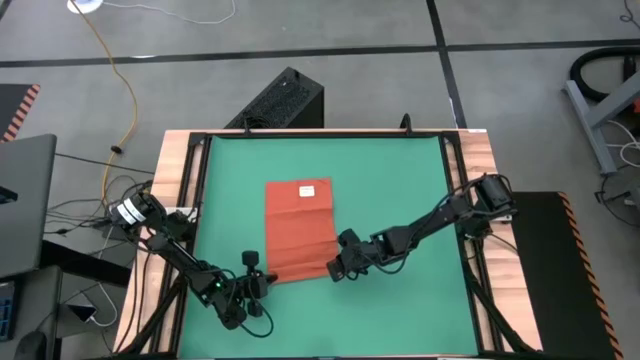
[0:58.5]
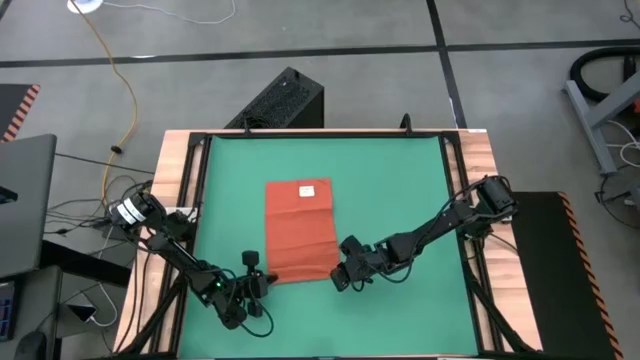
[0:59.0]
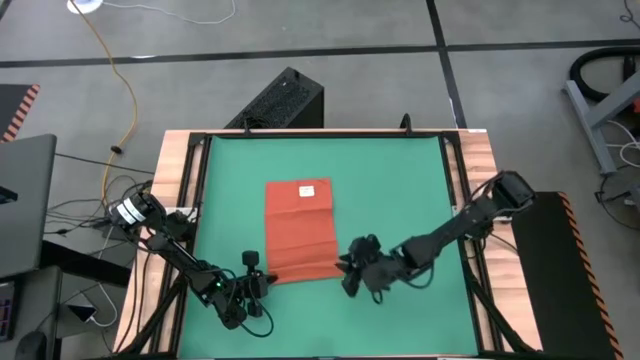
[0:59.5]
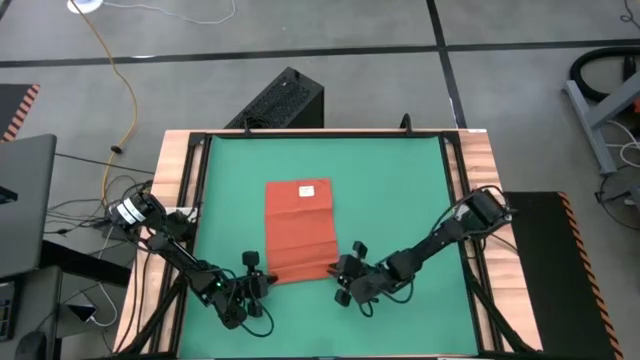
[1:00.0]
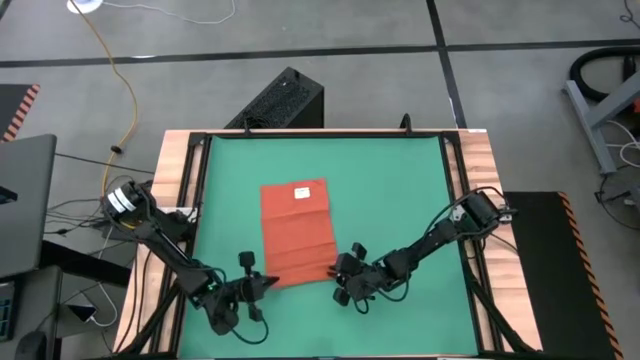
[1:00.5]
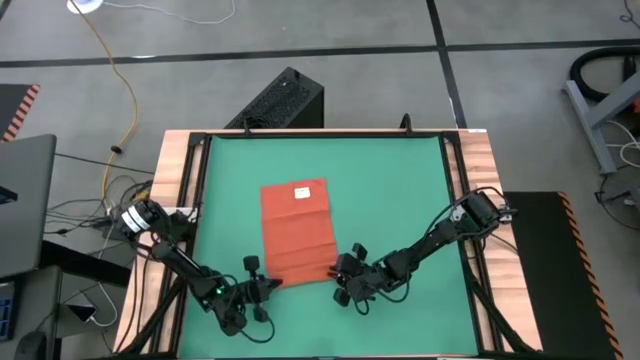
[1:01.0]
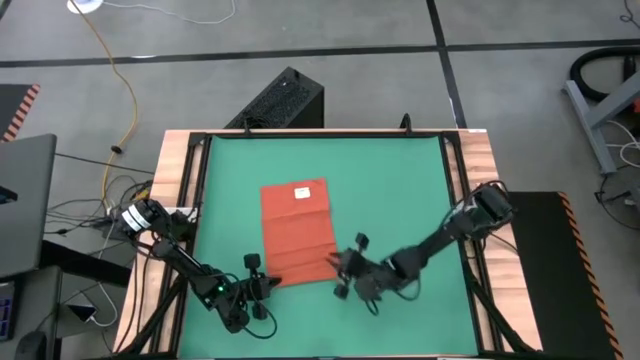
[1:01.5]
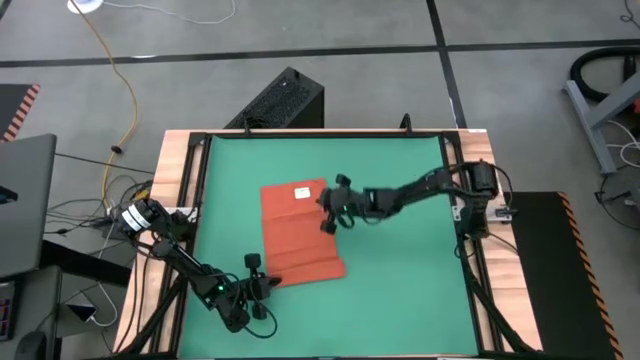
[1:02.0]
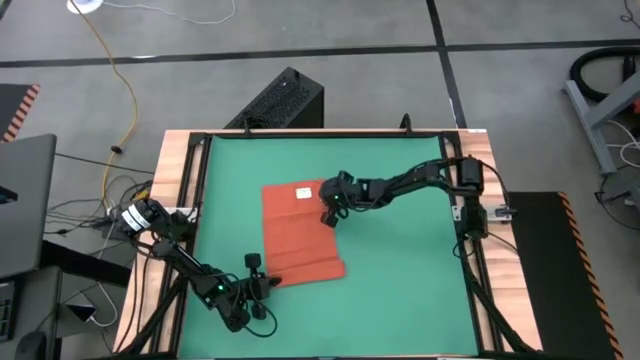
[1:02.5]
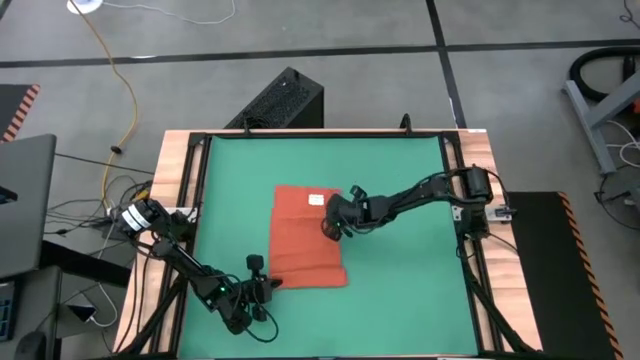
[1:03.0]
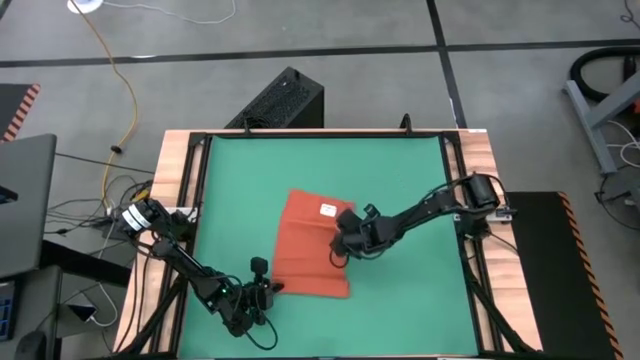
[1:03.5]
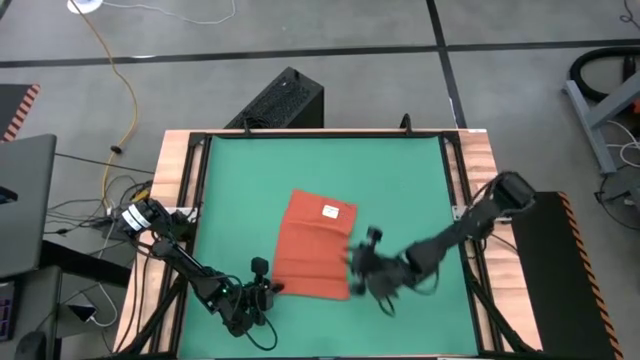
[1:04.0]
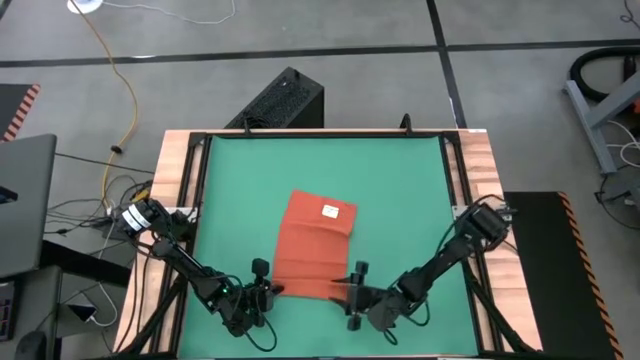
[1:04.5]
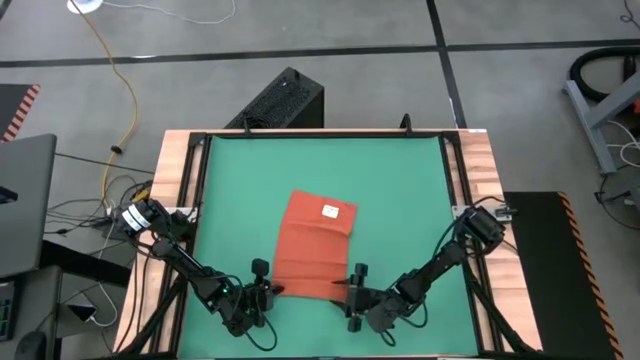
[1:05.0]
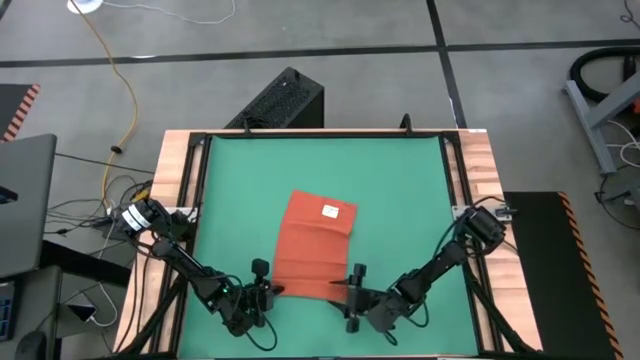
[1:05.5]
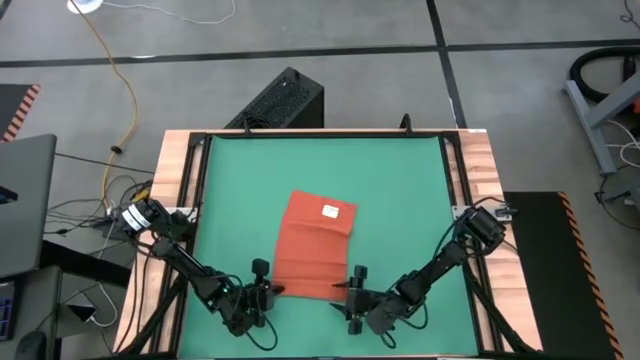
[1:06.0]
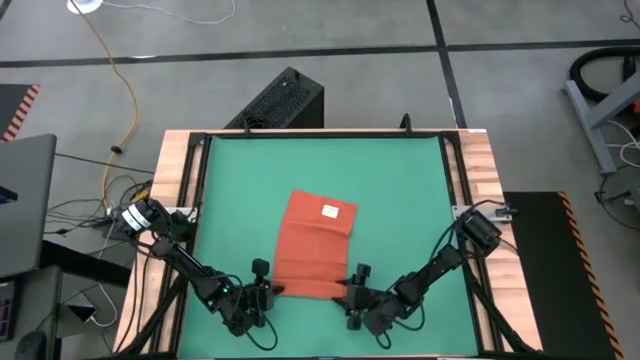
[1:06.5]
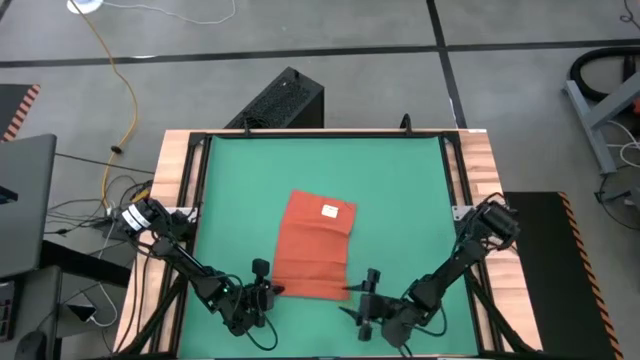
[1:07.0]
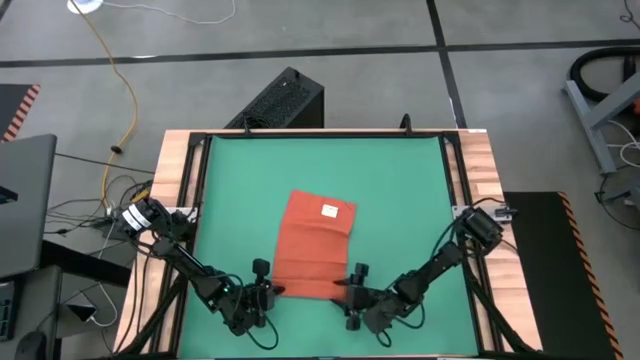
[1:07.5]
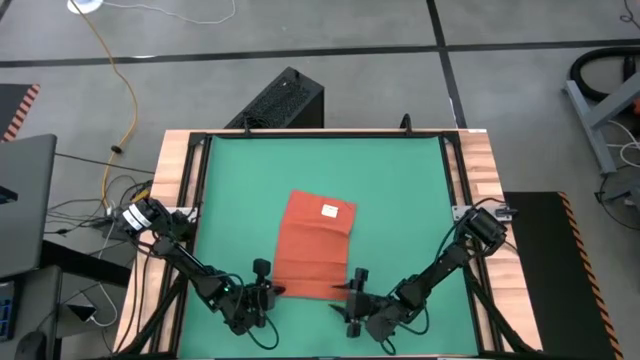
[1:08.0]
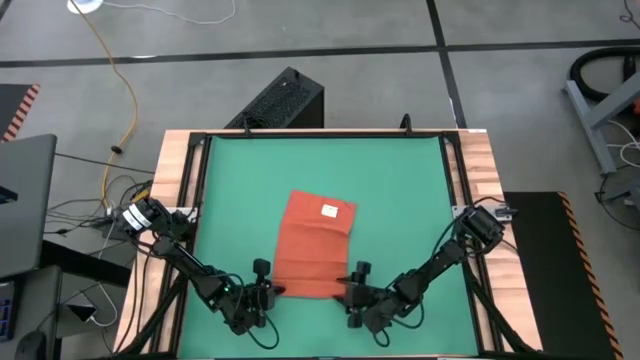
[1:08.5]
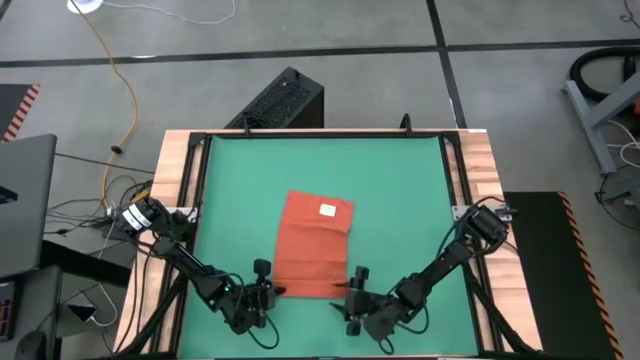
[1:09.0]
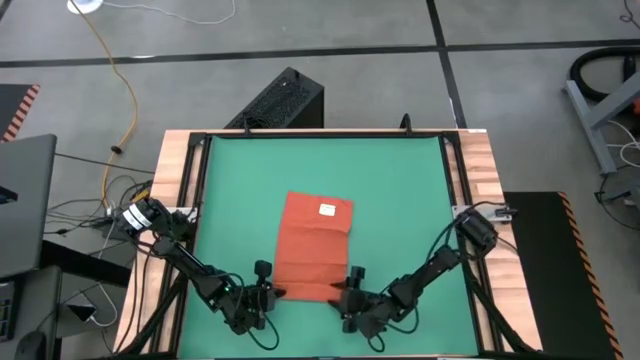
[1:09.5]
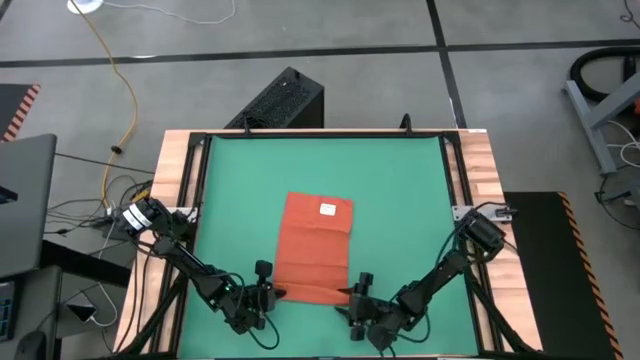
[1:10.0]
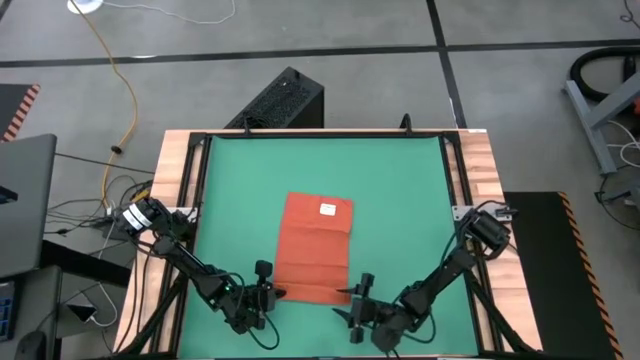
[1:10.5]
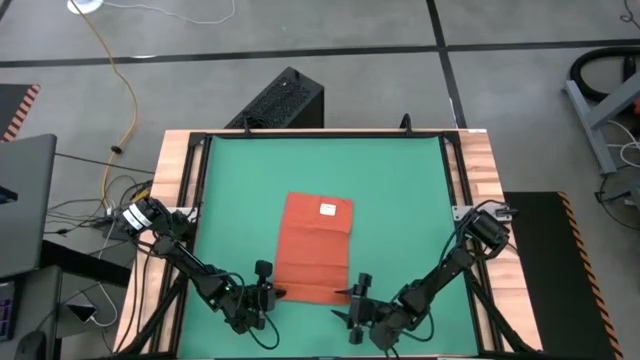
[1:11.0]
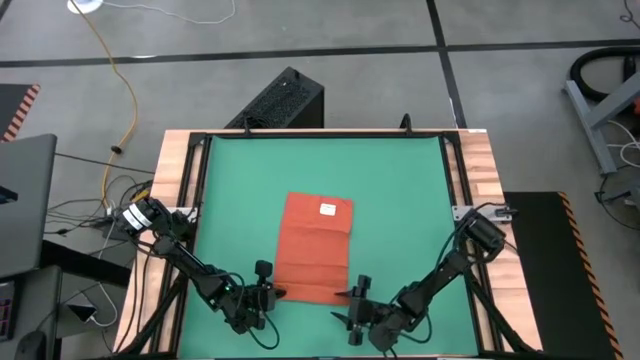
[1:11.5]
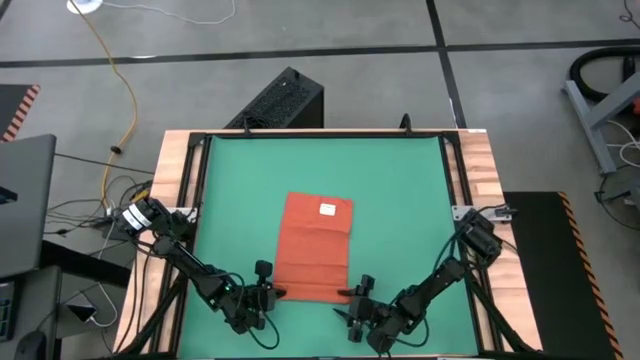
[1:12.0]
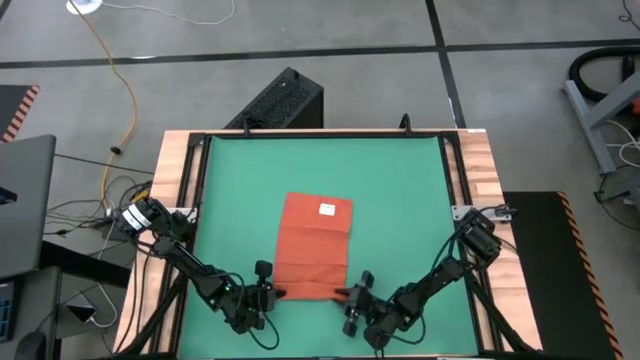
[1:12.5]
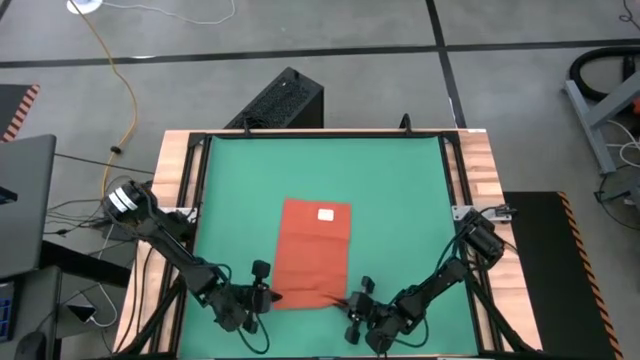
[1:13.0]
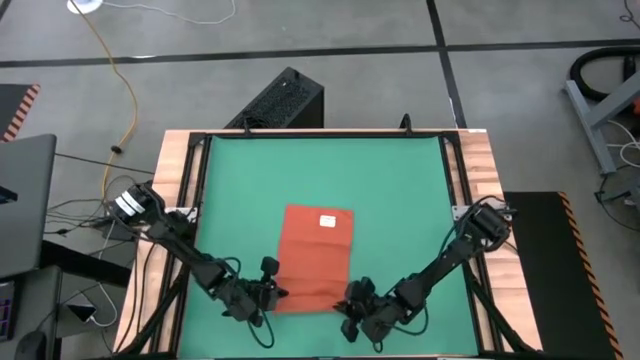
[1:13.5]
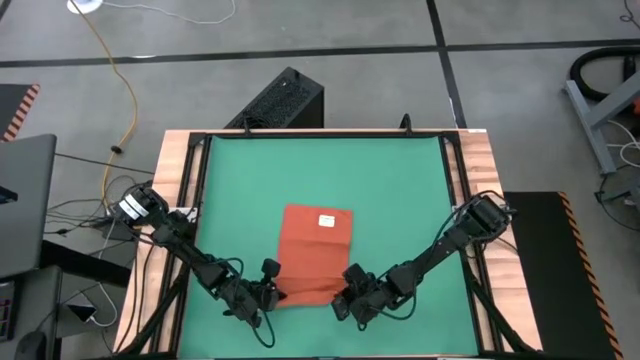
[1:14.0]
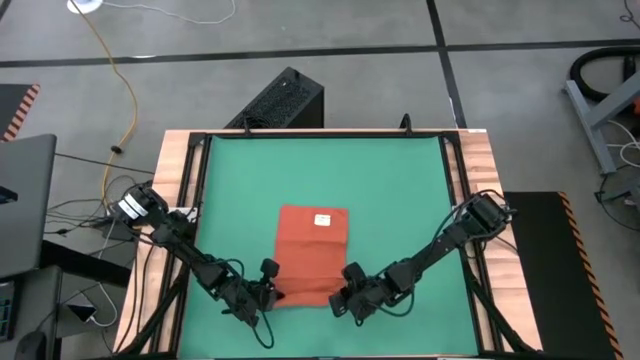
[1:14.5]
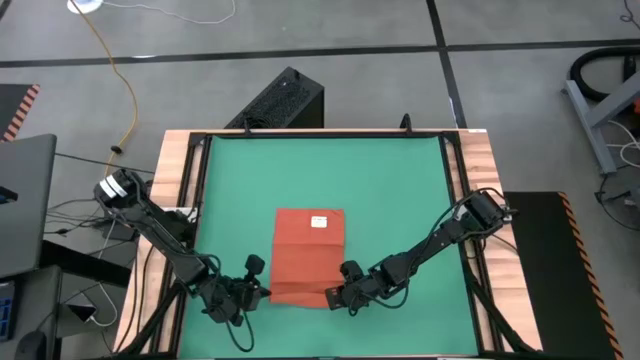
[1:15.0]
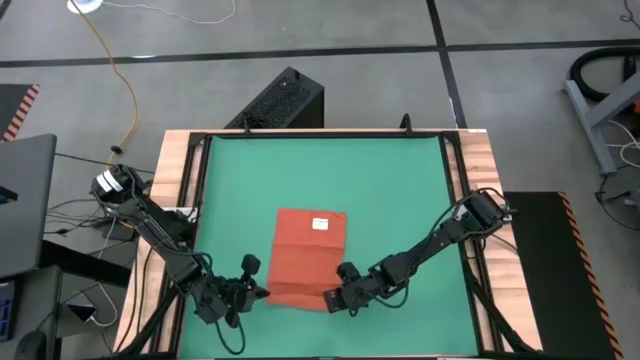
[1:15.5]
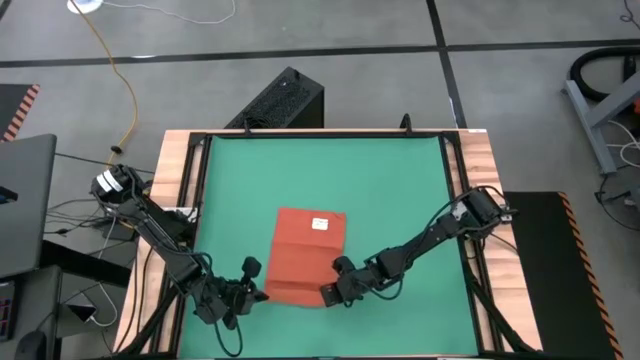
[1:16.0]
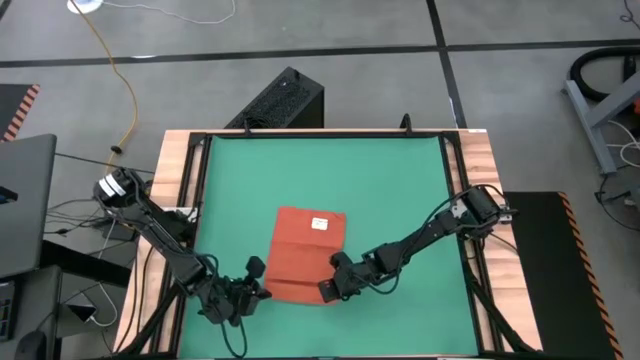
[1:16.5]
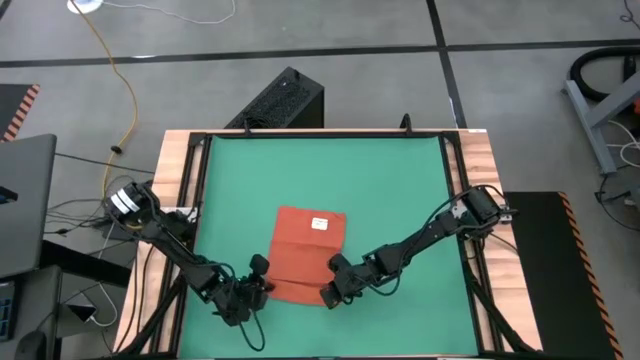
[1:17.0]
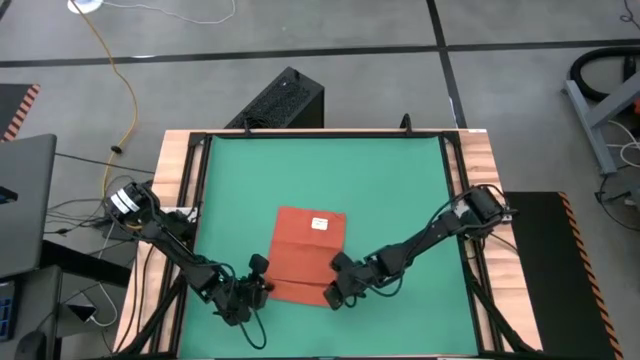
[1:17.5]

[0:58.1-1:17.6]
Task: Roll towel
Roll the orange towel

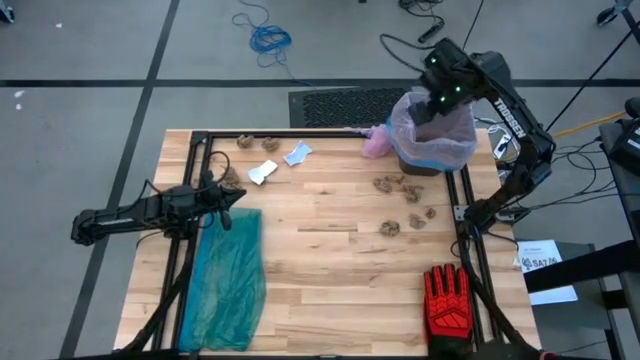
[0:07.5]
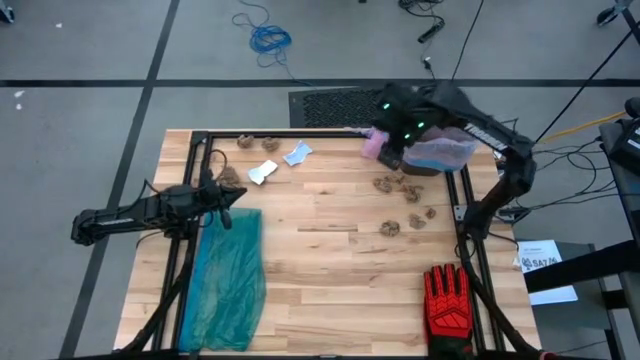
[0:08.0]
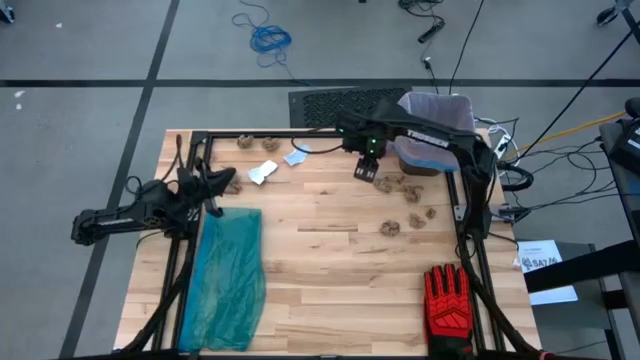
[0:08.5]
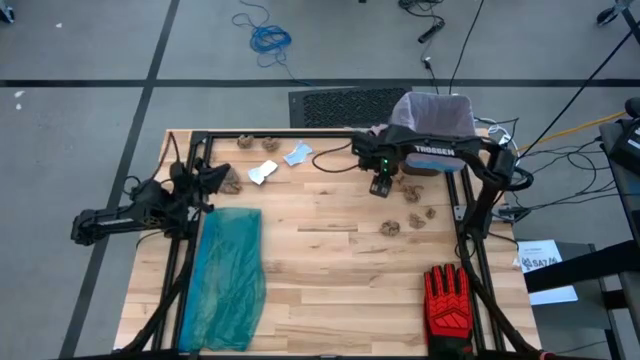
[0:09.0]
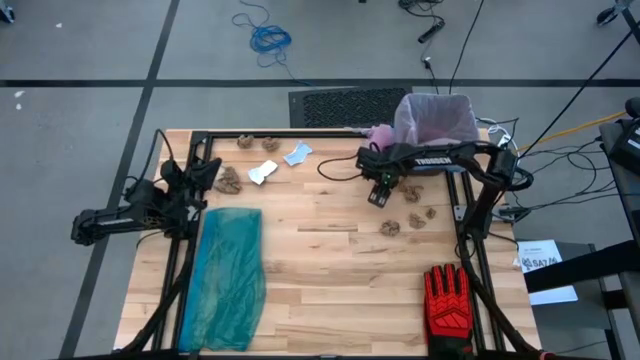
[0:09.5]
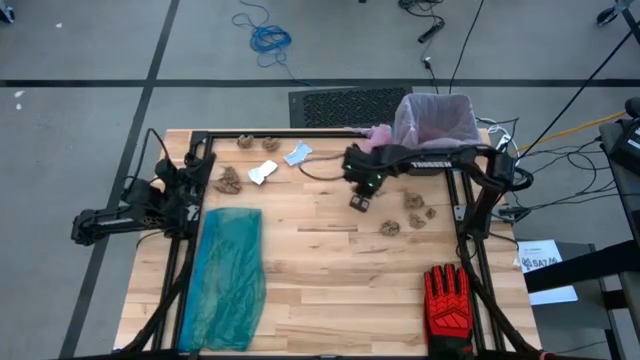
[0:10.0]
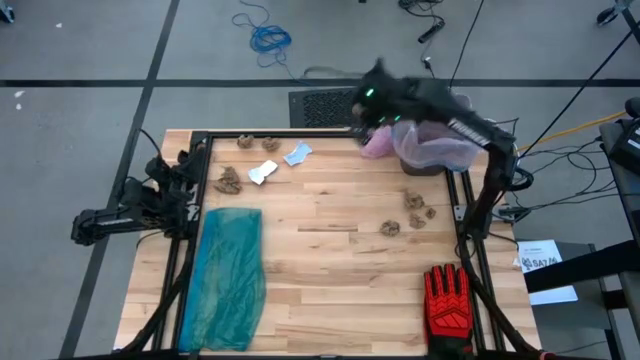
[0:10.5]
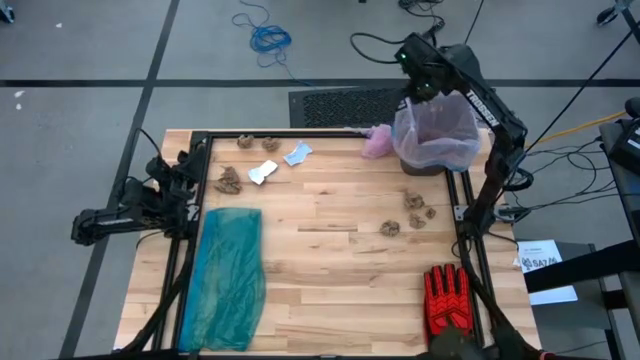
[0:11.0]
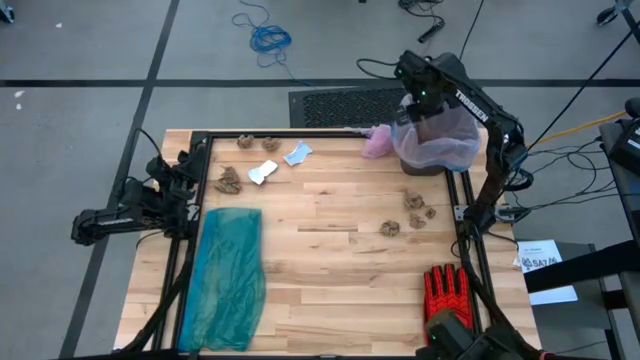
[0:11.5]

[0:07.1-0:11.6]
Task: place trash/remove bag and relplace
Put the brown napkin into the trash bin
